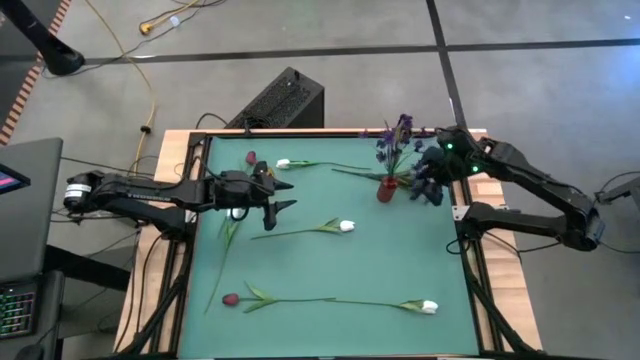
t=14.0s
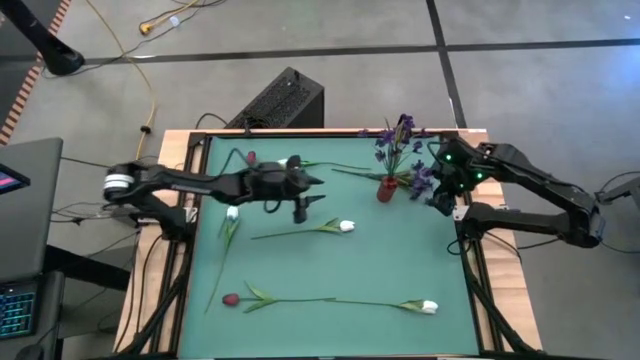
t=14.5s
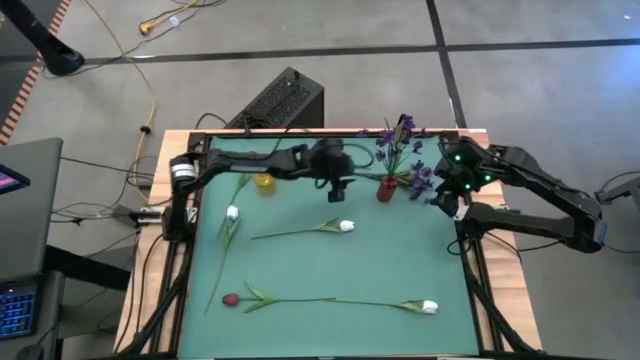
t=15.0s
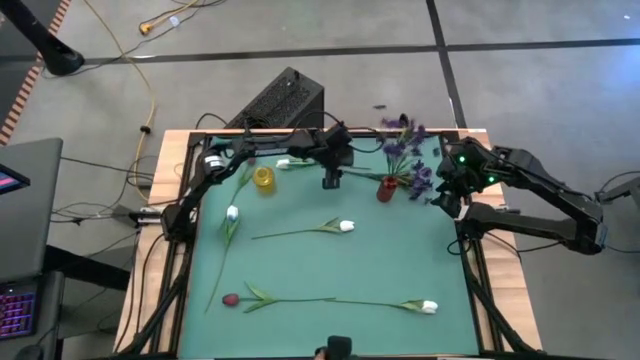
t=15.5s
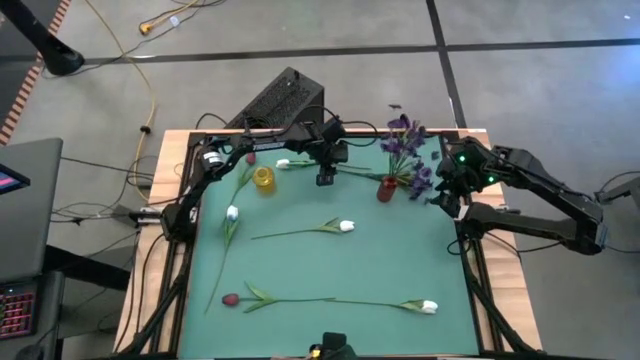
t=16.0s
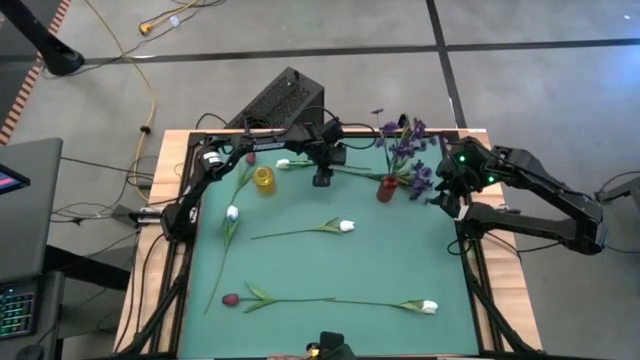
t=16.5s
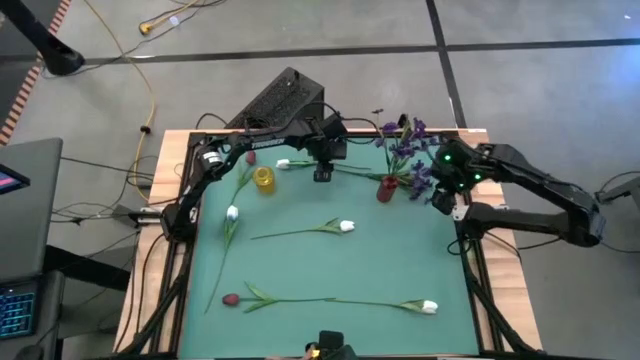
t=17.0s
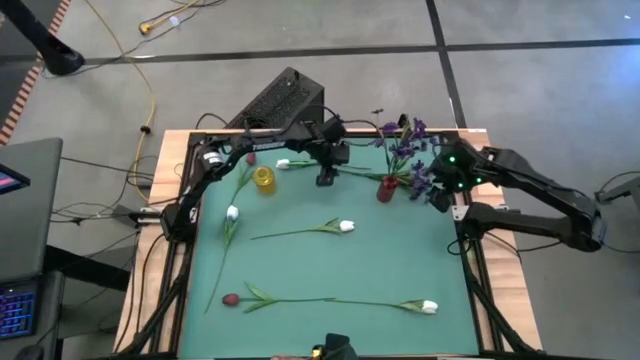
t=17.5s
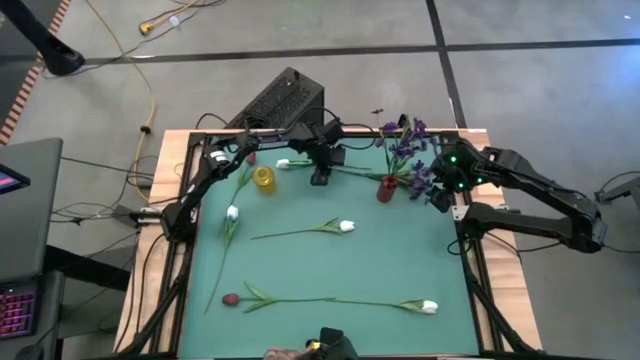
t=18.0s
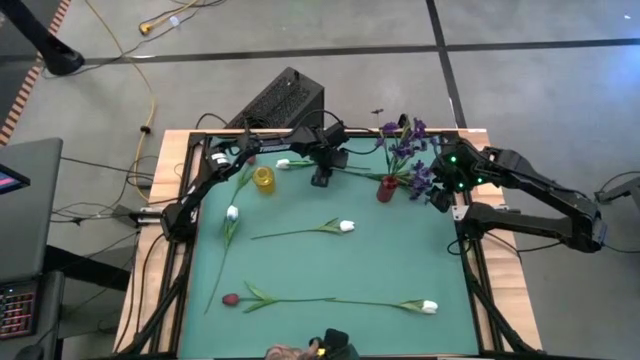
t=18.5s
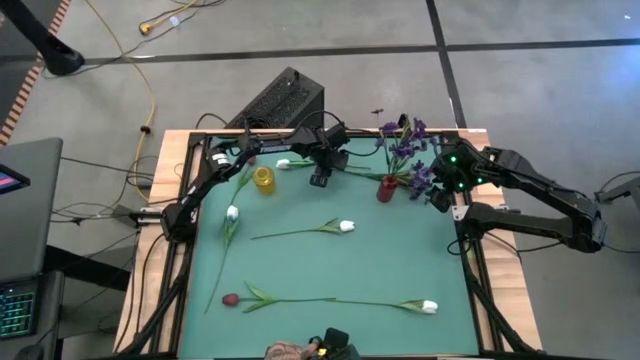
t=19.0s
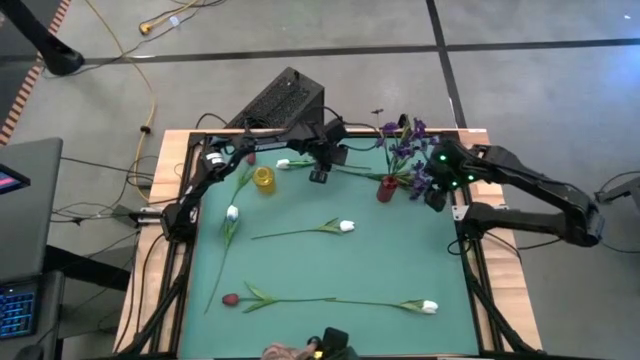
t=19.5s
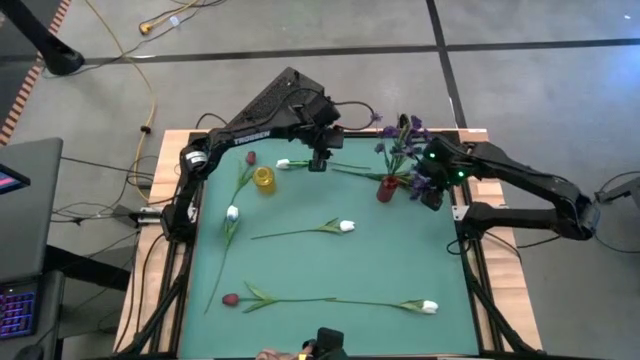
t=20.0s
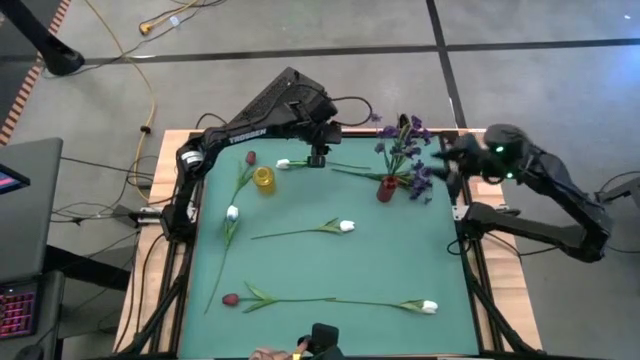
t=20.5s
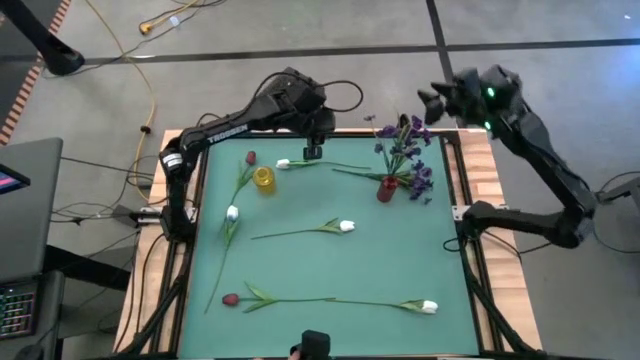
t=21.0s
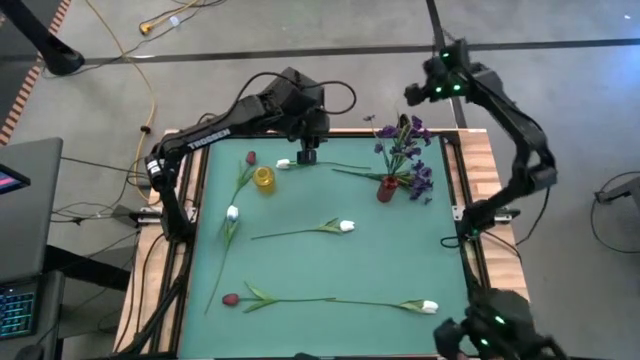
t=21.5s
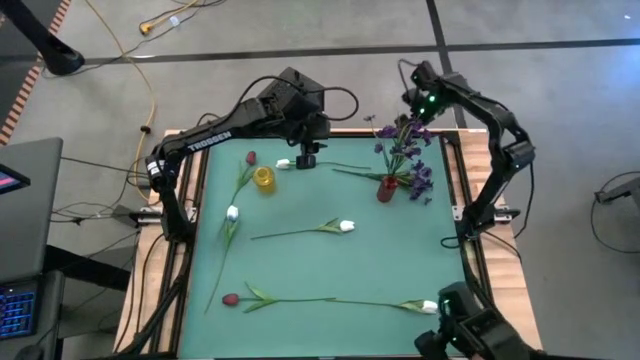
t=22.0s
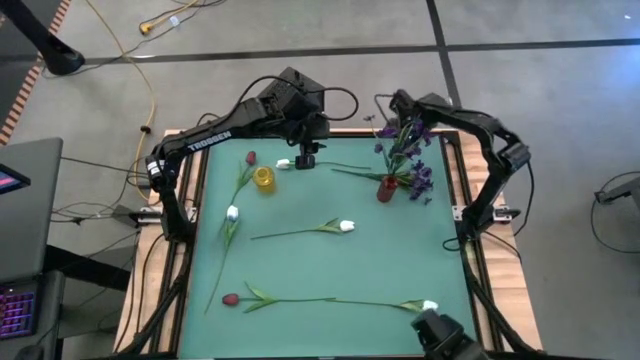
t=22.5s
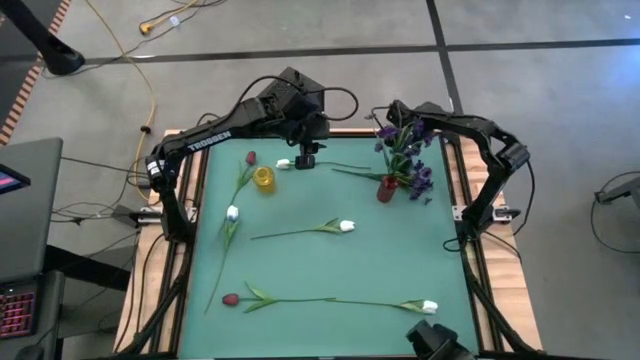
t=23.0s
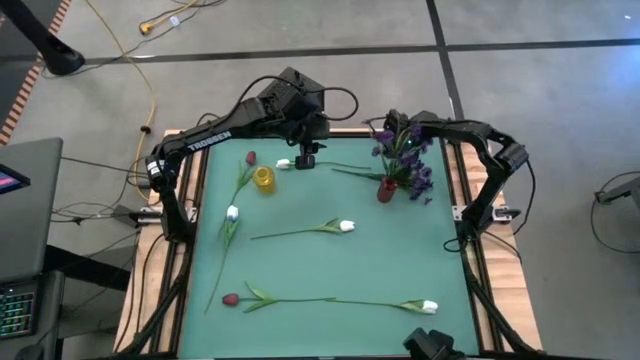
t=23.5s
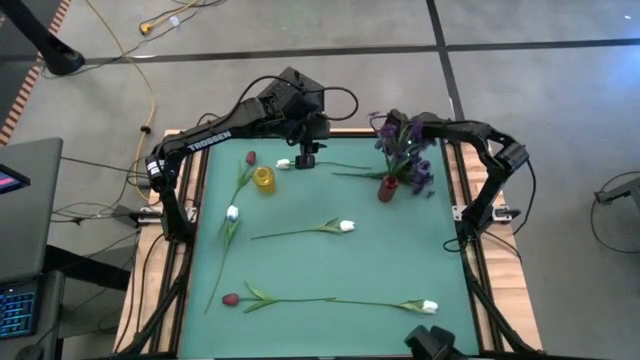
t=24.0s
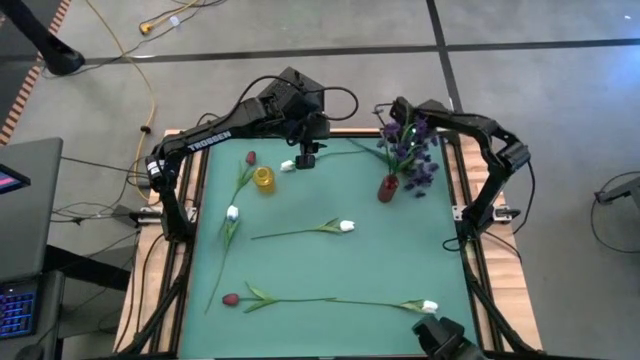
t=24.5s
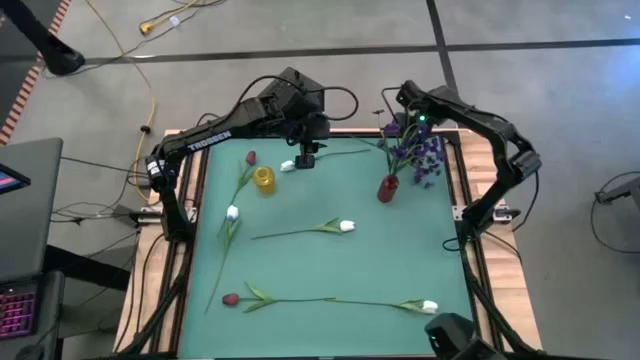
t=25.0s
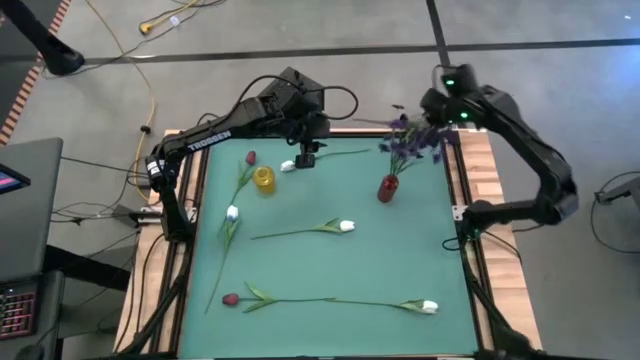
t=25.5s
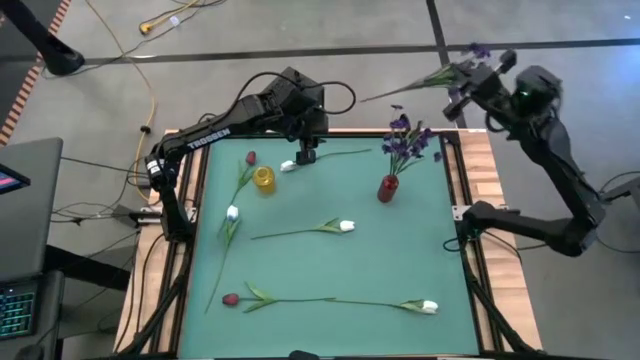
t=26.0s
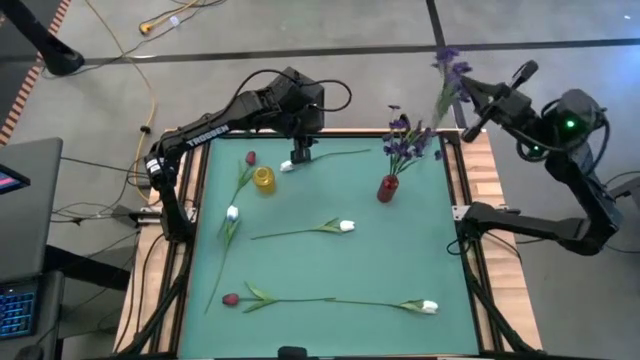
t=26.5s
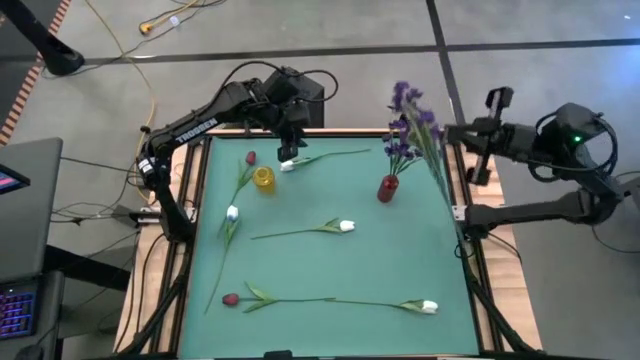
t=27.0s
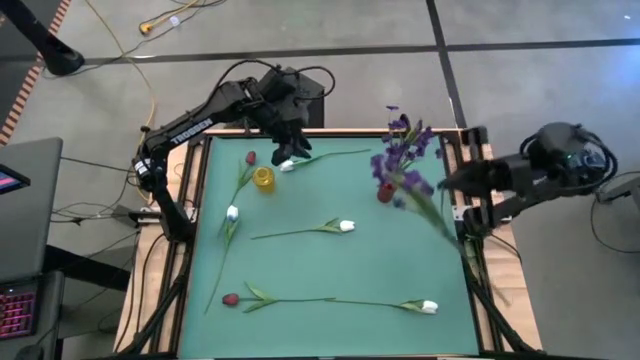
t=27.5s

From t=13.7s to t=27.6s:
Task: Sort flowers into vase by color
Put the violet flowers into the red vase

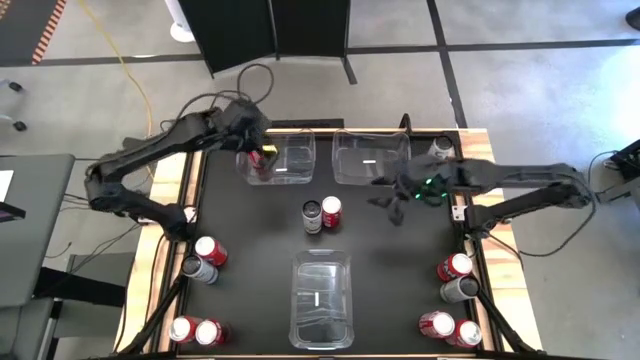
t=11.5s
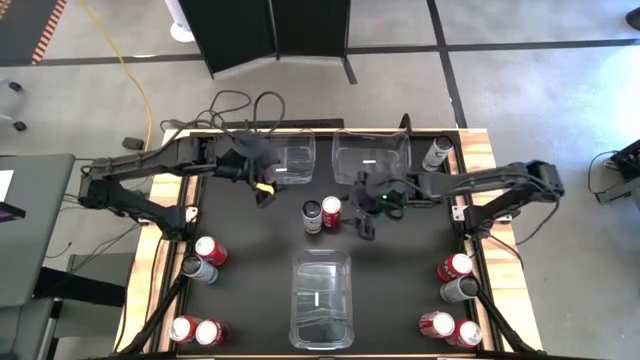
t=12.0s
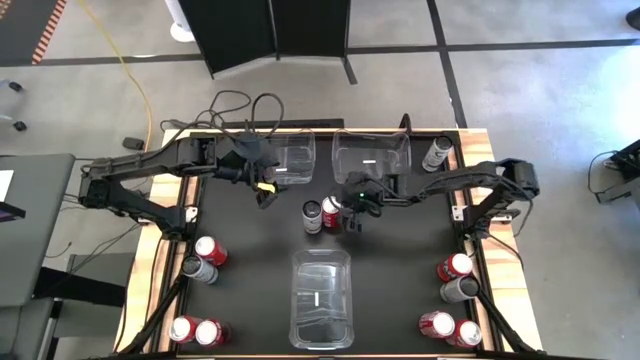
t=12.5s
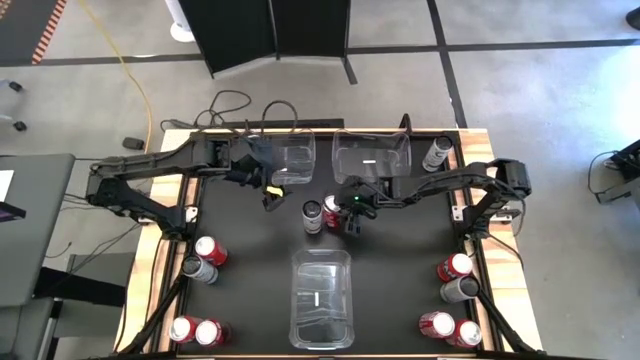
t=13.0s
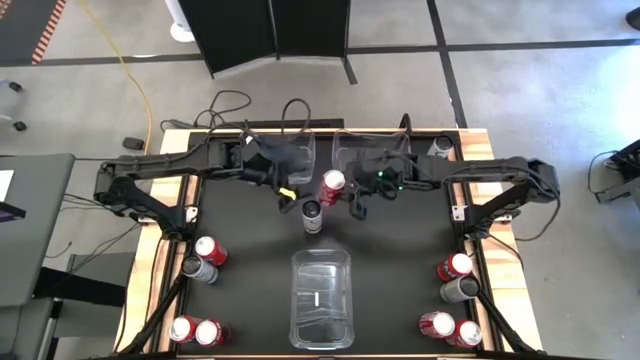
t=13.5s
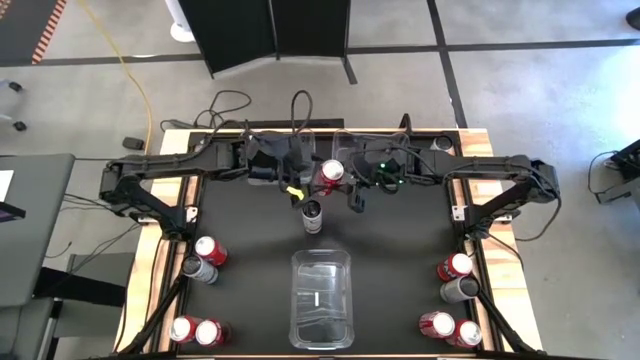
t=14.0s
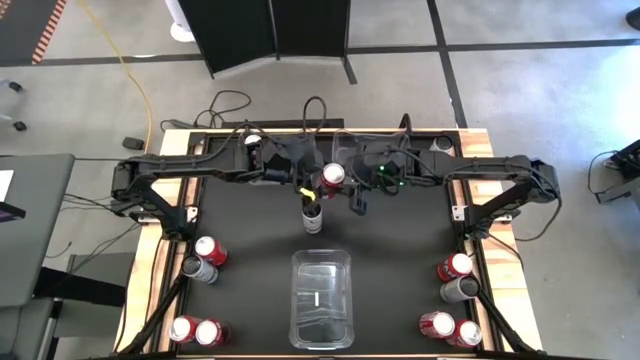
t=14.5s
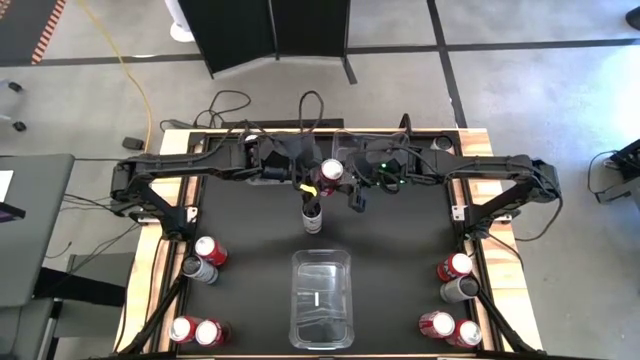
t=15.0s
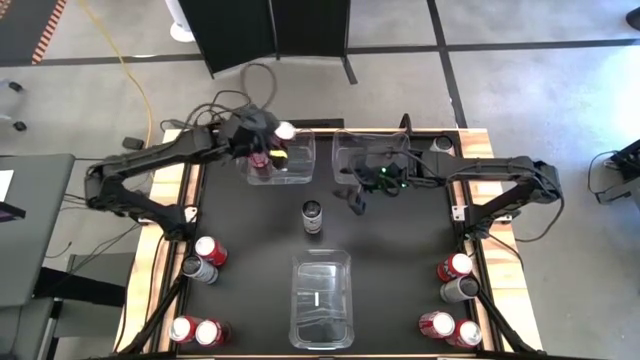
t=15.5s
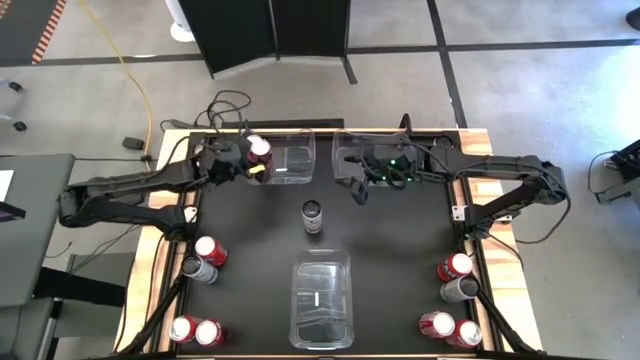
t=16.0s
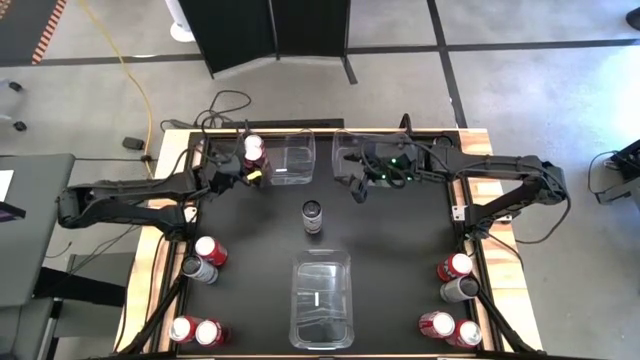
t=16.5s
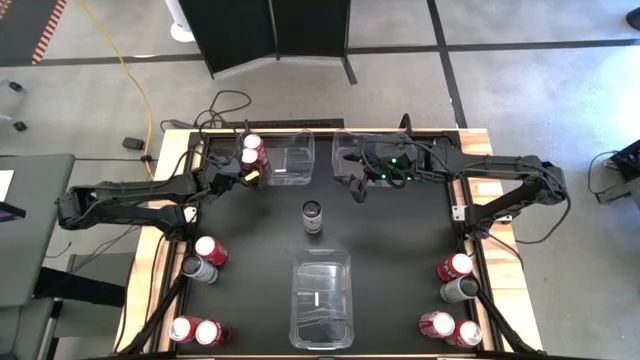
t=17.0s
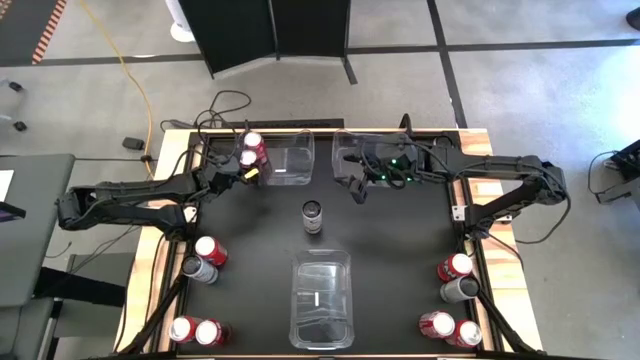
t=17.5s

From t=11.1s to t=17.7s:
Task: Sort soda cans
Put the red white soda can into the left transparent bin
